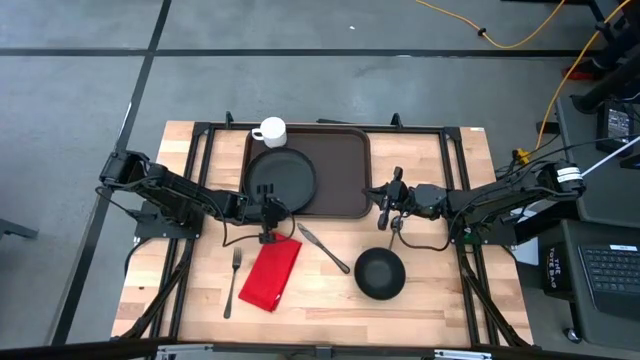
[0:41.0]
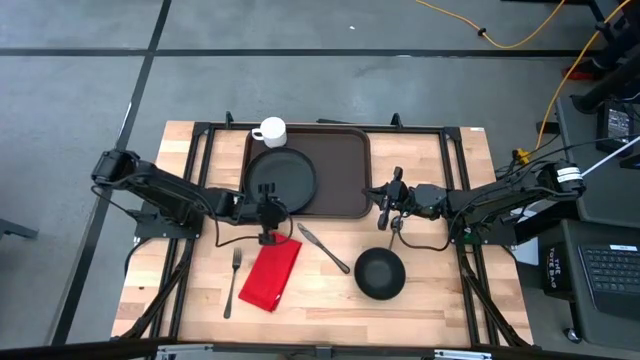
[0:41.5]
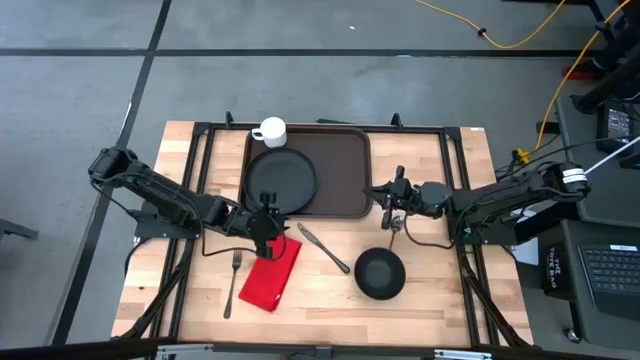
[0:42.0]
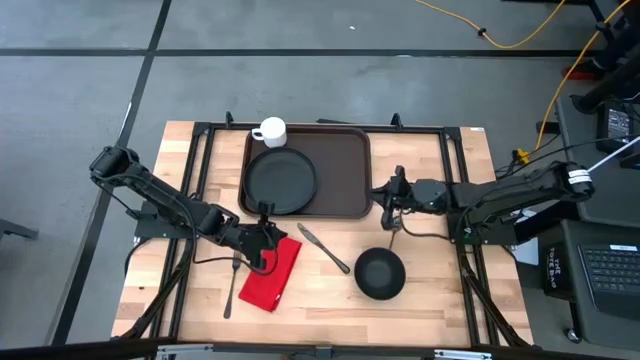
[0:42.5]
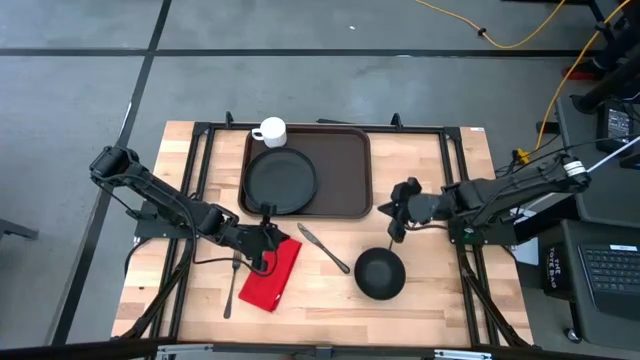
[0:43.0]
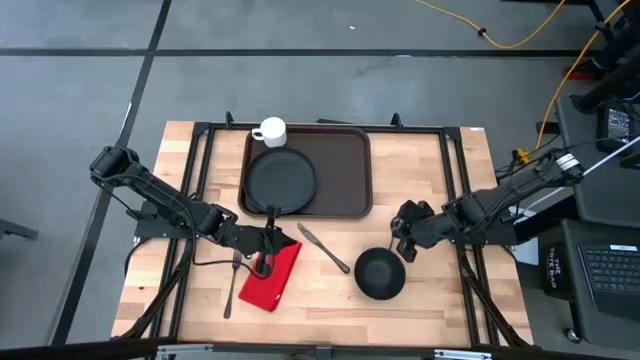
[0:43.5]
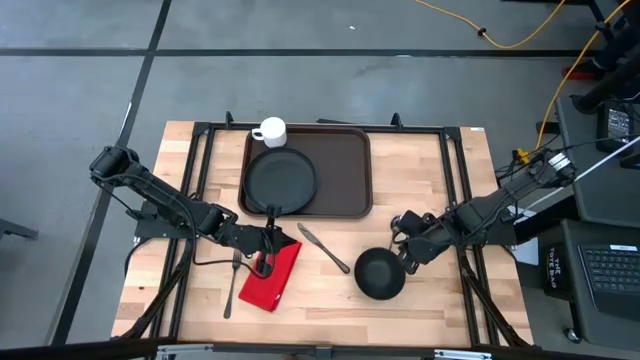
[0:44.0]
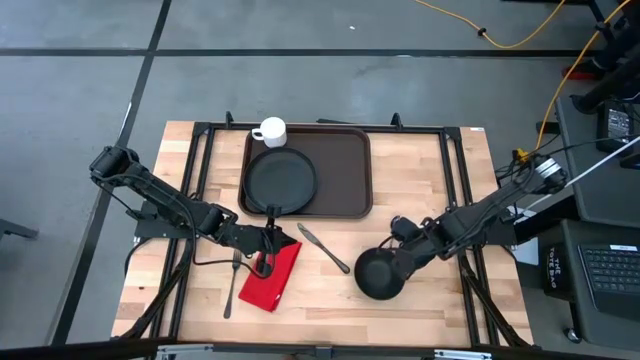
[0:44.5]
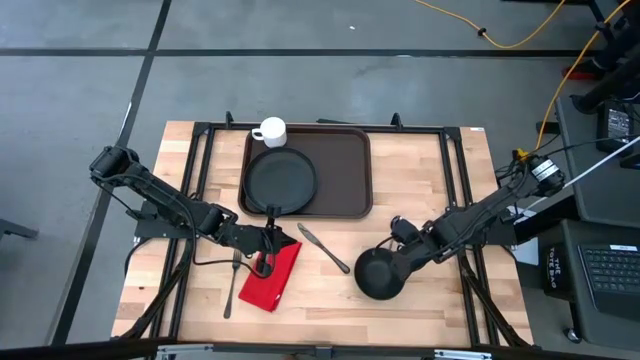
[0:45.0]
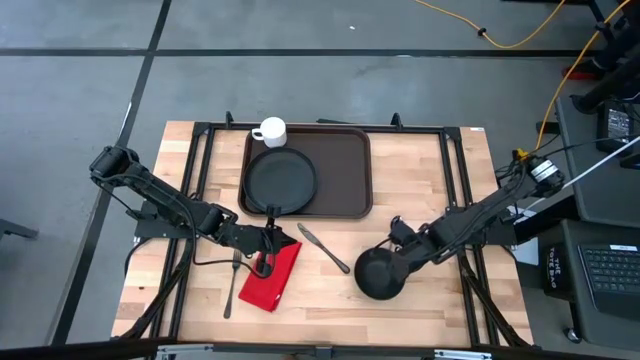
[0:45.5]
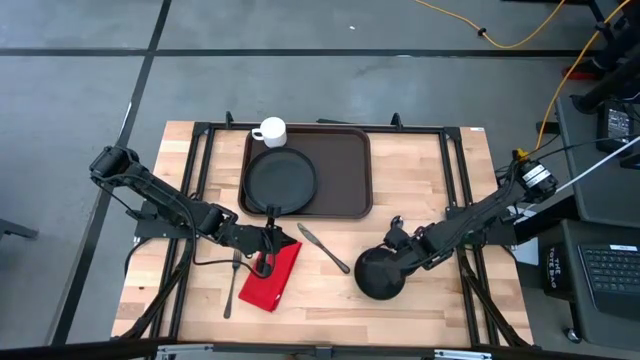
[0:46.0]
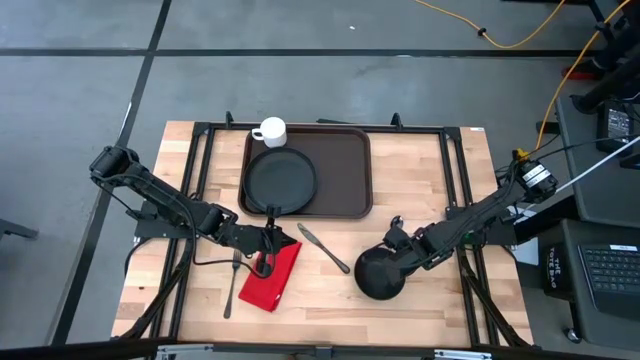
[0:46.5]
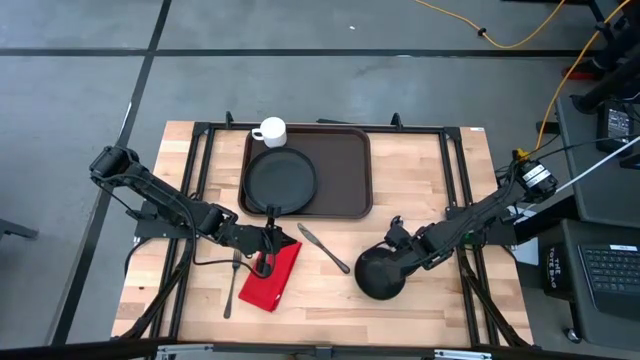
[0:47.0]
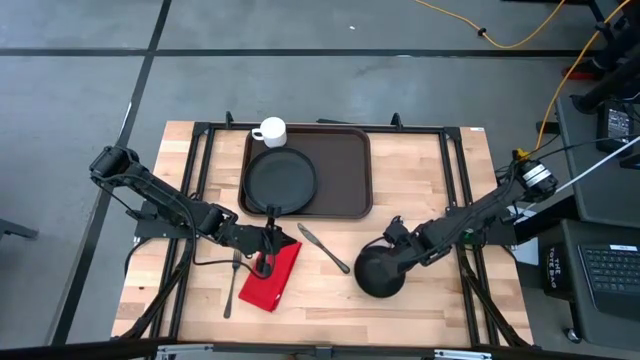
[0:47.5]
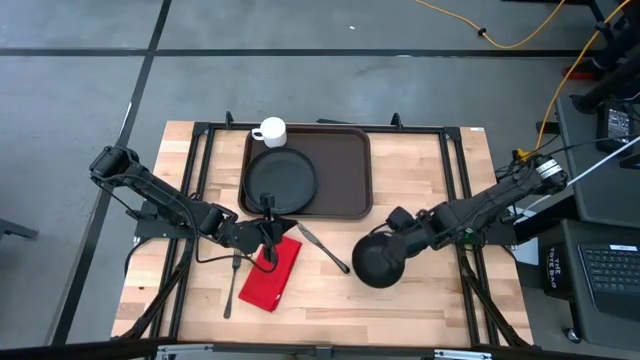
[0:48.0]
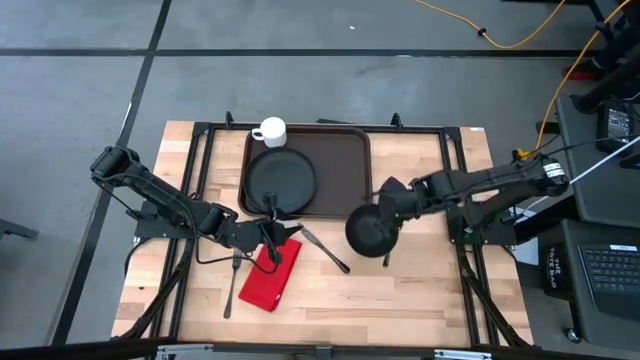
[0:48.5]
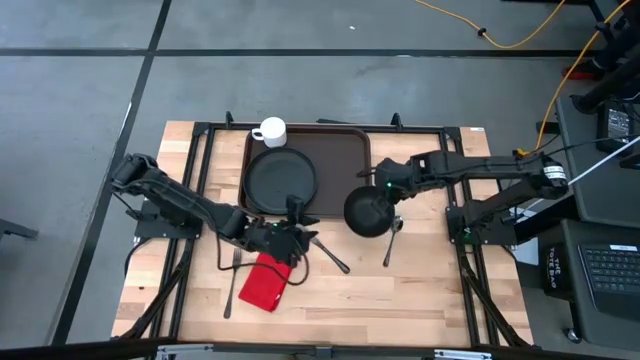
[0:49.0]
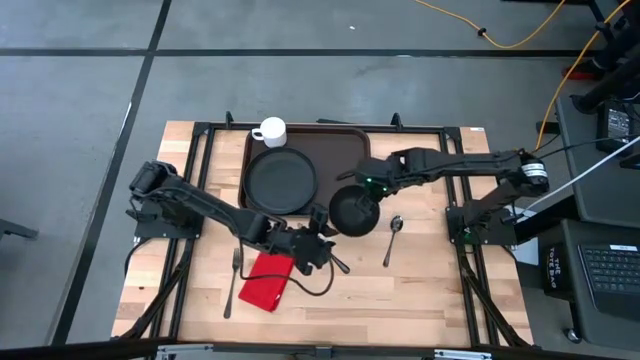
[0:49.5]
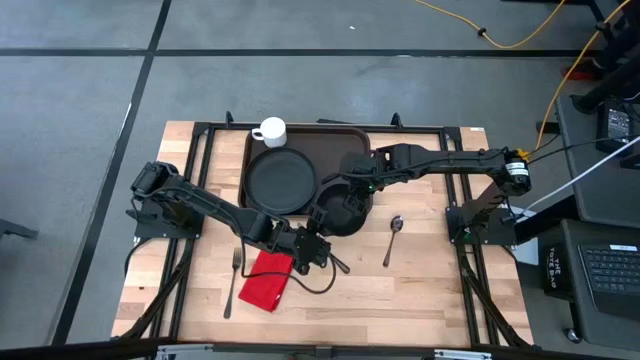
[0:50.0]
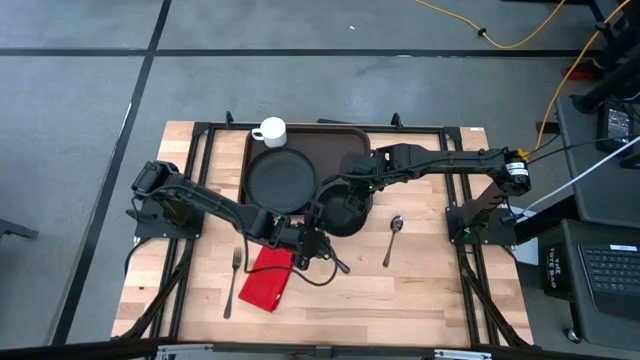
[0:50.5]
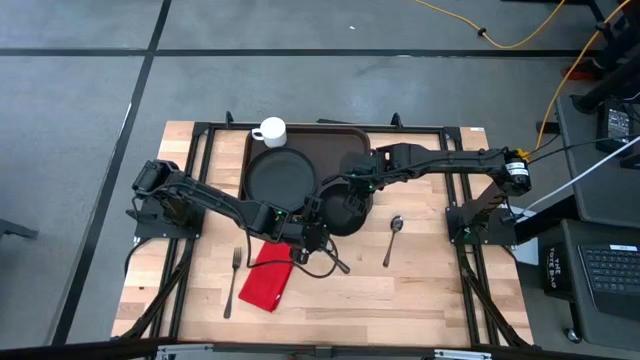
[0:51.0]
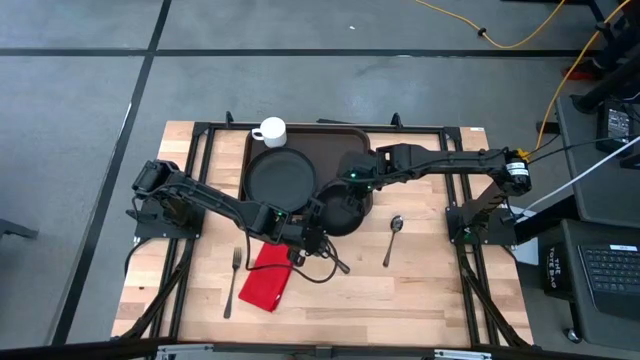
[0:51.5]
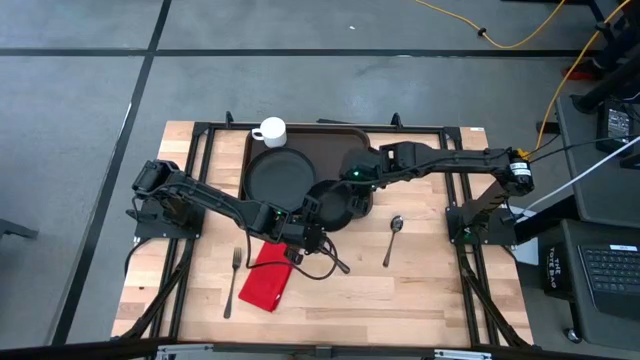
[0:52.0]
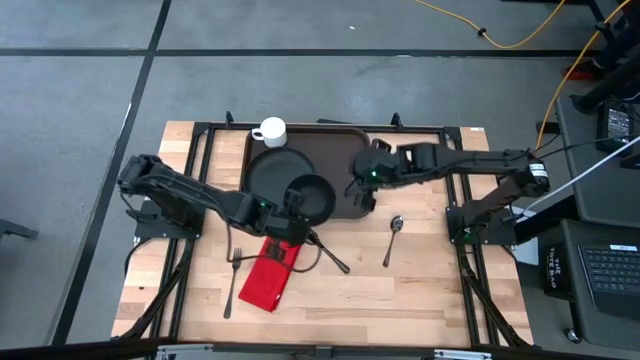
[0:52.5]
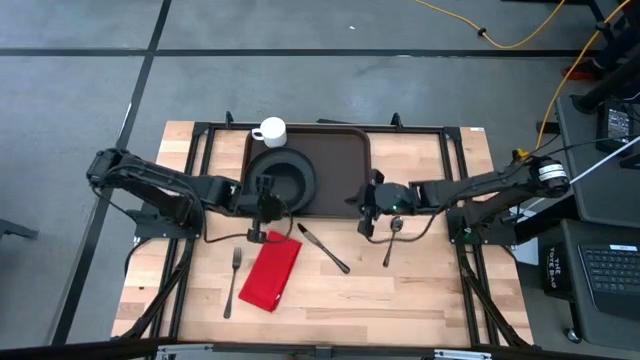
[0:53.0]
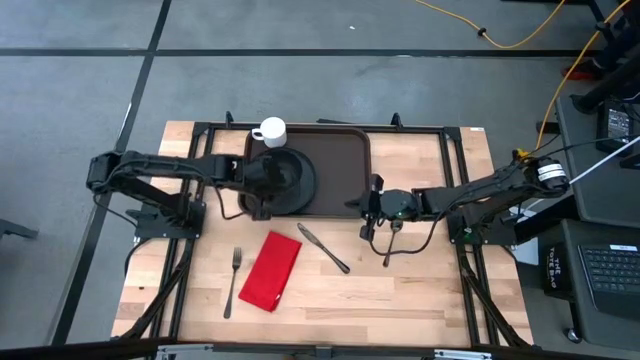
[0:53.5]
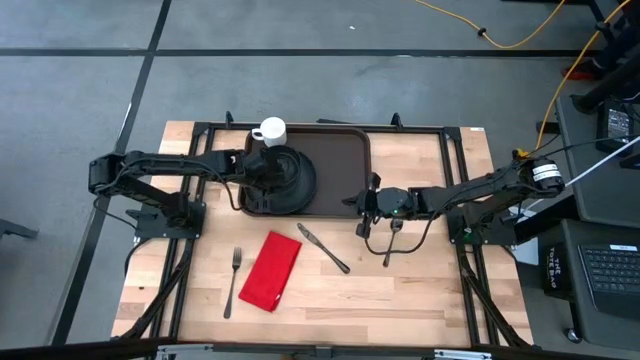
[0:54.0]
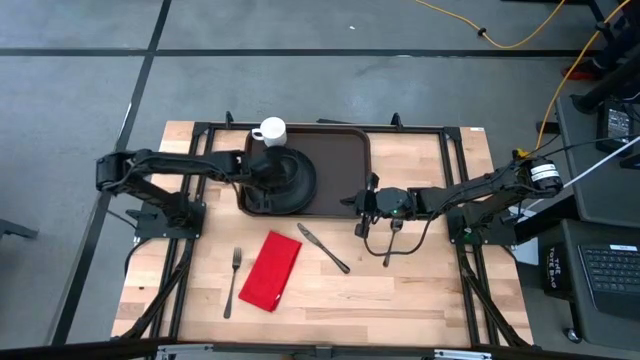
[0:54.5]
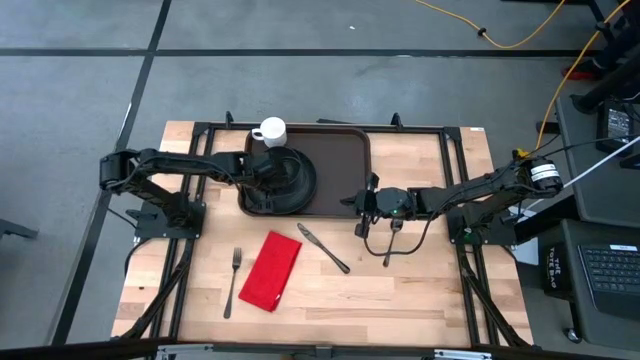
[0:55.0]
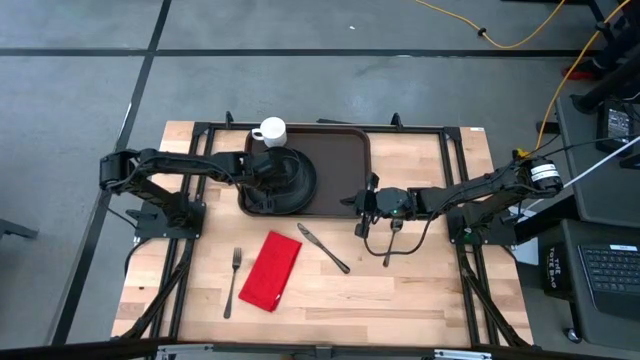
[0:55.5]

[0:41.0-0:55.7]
Task: Set up tray
Put the black bowl on the black plate

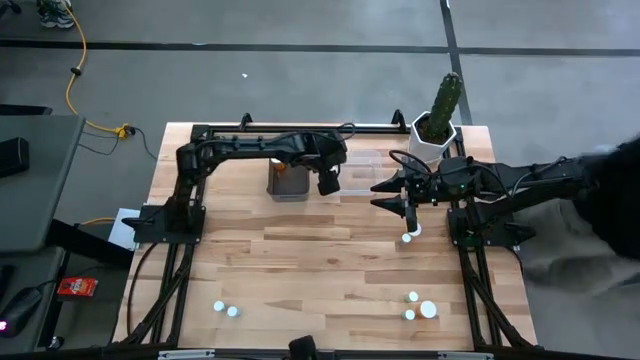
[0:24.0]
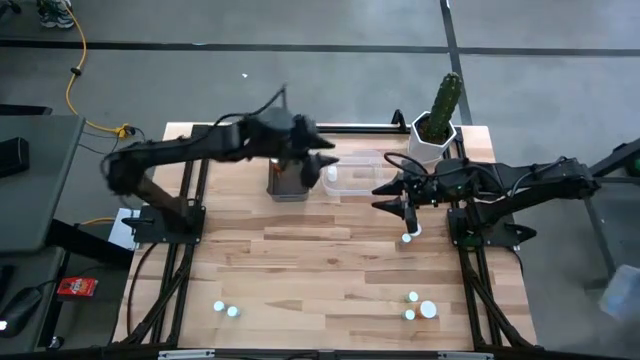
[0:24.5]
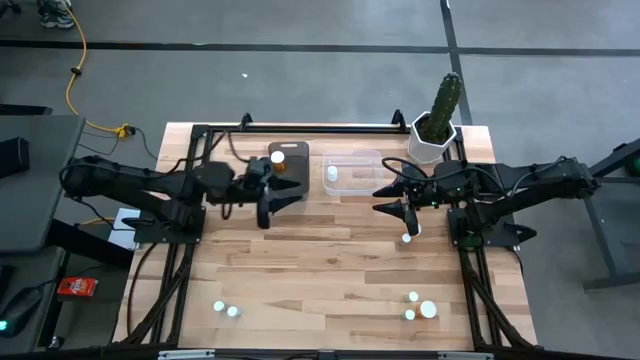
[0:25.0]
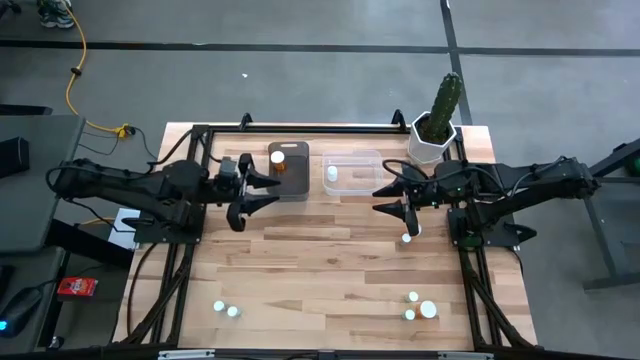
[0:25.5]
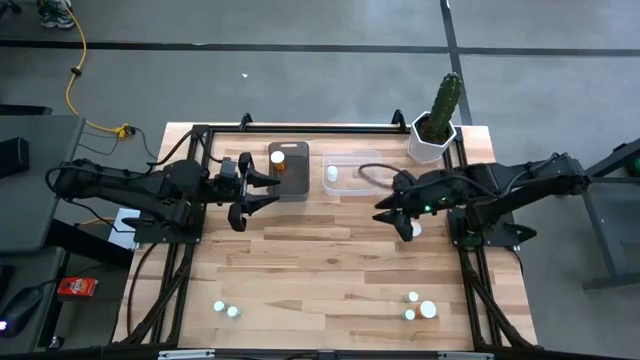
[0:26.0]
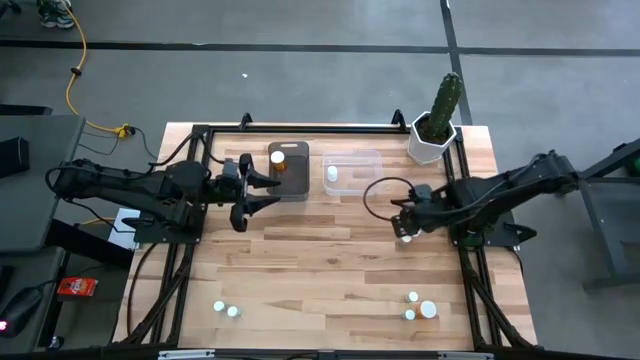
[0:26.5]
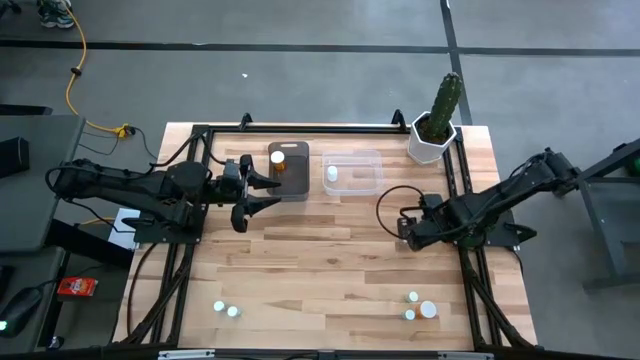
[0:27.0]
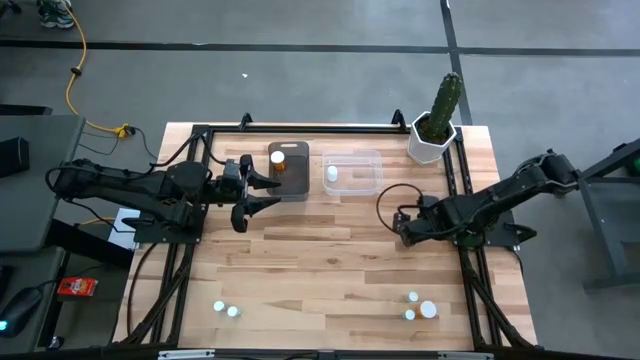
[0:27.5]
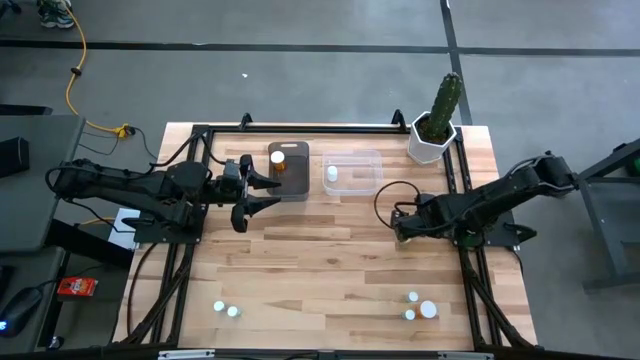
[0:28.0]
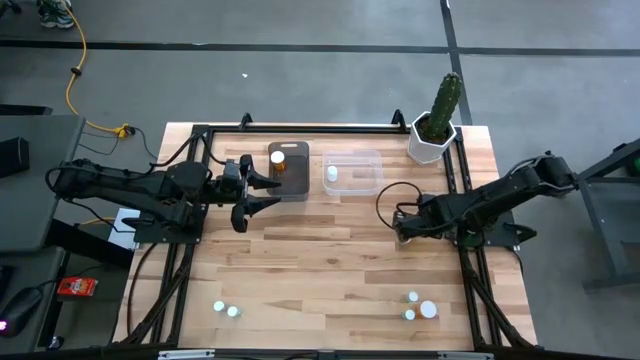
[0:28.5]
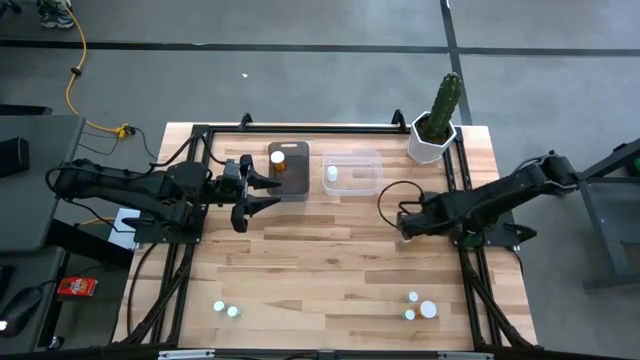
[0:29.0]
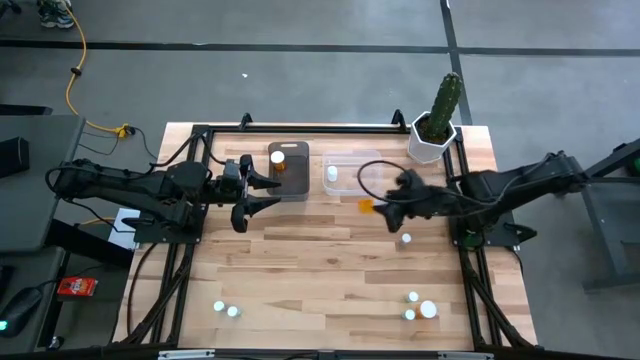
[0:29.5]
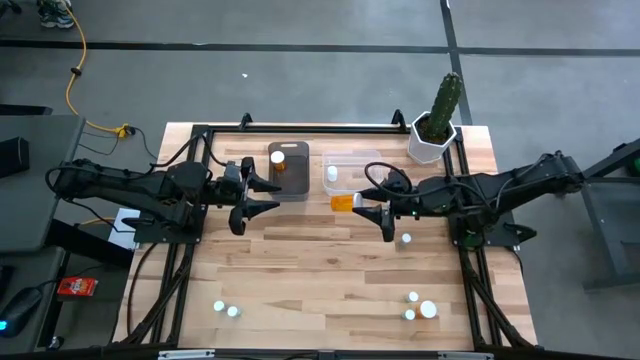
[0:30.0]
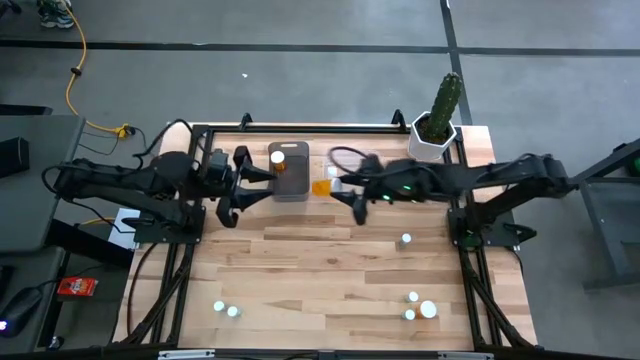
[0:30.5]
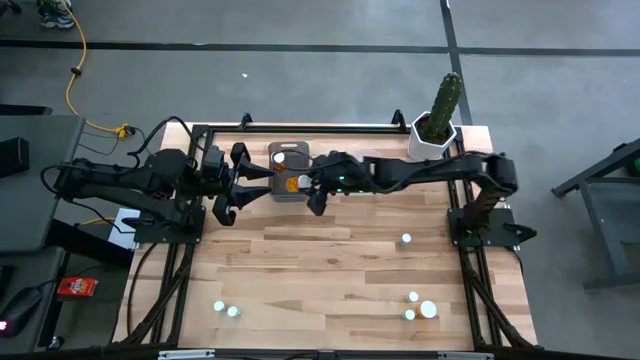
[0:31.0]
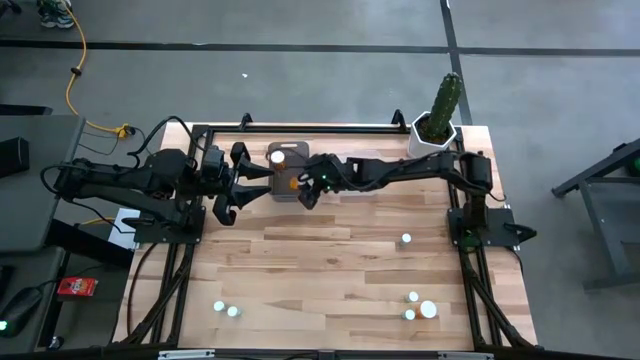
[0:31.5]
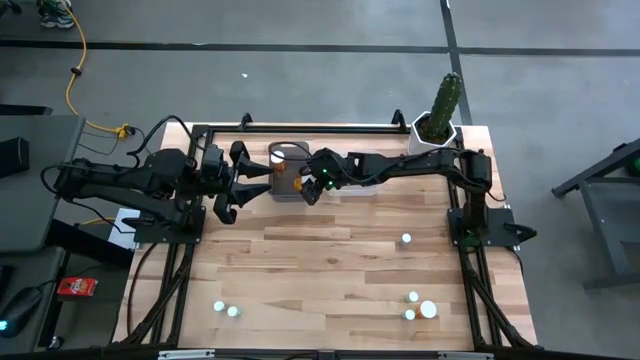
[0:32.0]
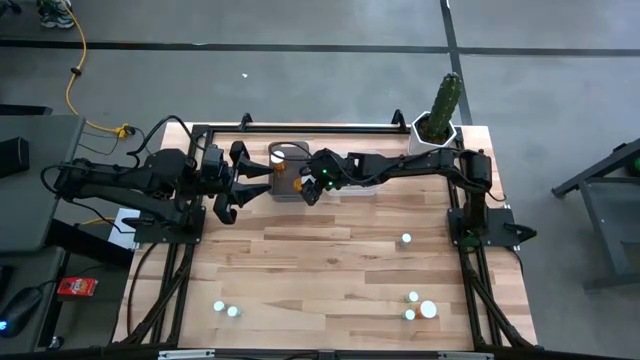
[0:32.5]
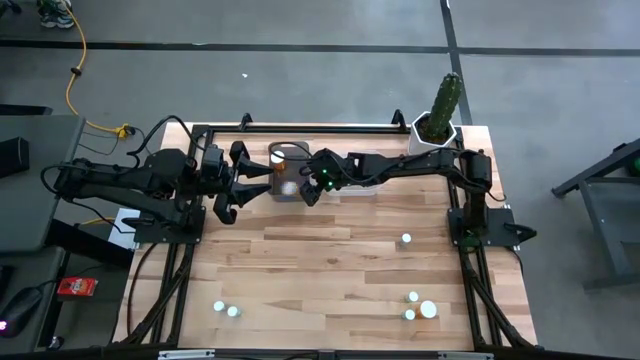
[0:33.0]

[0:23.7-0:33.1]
Task: Pick and place medicine bottles into bin by pill shape (circle, oval)
Put the top orange capsule bottle into the black bin
